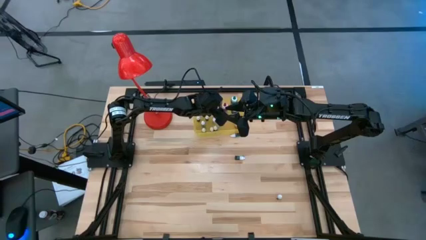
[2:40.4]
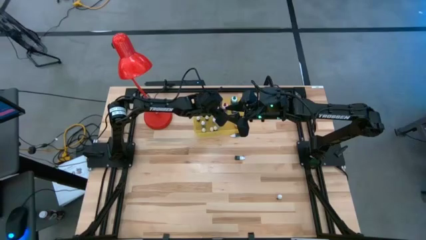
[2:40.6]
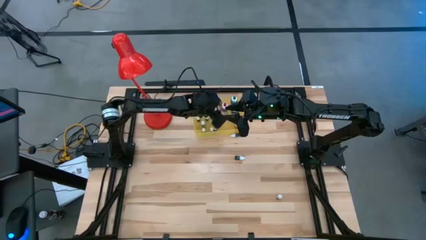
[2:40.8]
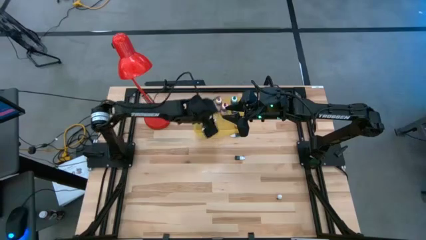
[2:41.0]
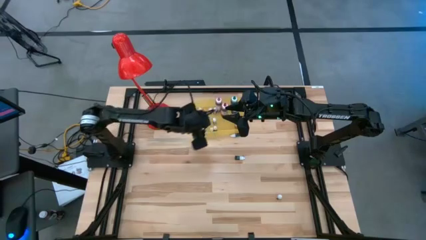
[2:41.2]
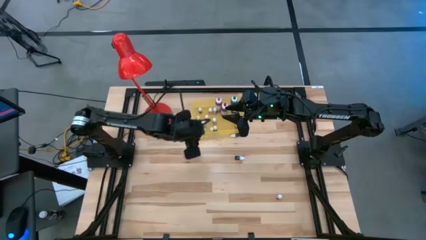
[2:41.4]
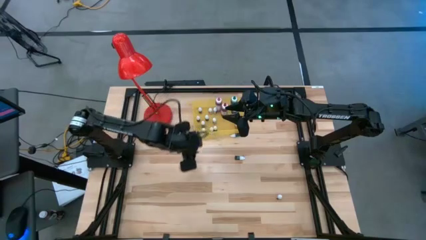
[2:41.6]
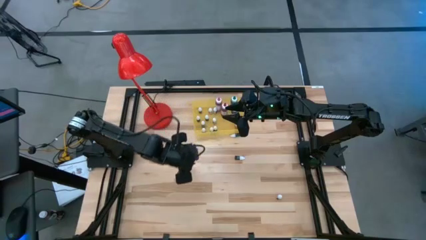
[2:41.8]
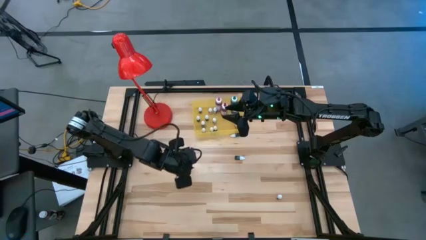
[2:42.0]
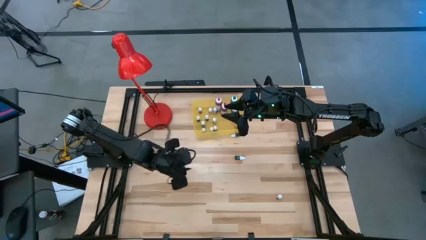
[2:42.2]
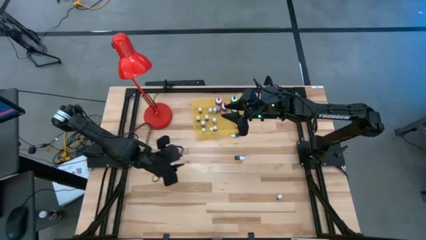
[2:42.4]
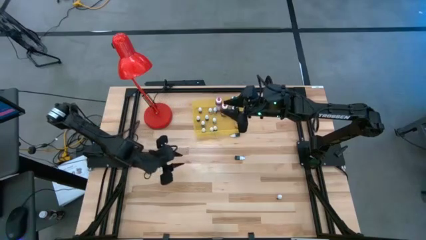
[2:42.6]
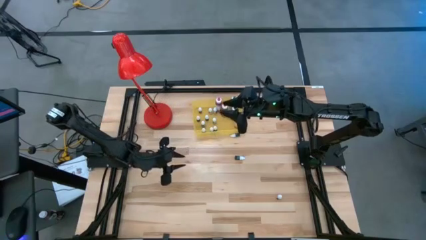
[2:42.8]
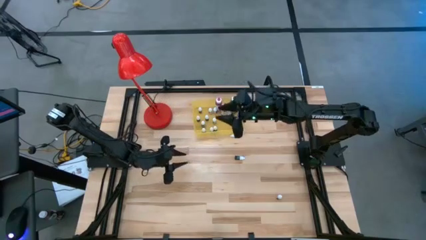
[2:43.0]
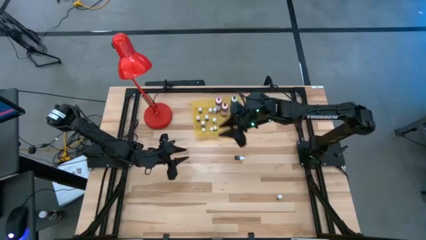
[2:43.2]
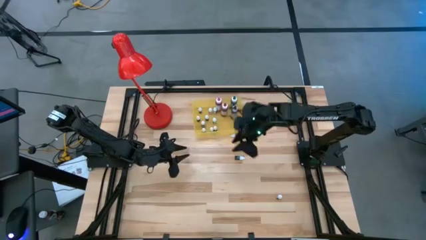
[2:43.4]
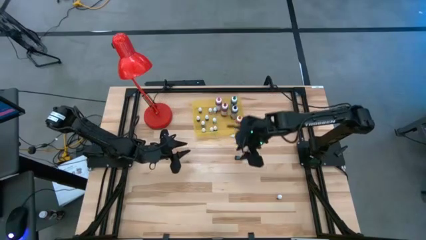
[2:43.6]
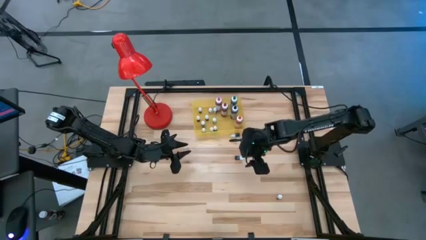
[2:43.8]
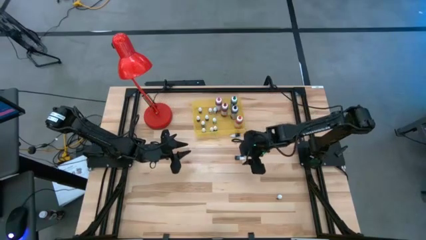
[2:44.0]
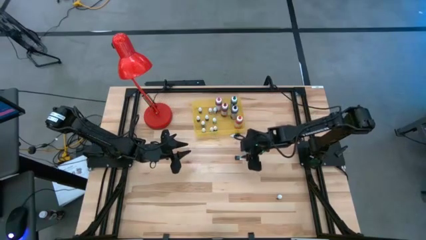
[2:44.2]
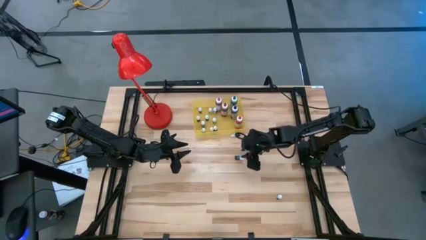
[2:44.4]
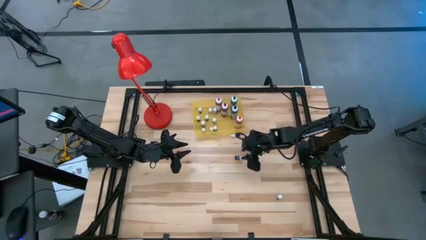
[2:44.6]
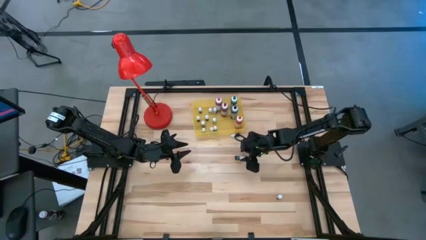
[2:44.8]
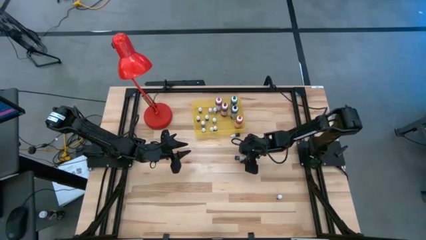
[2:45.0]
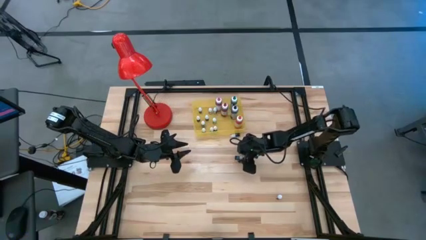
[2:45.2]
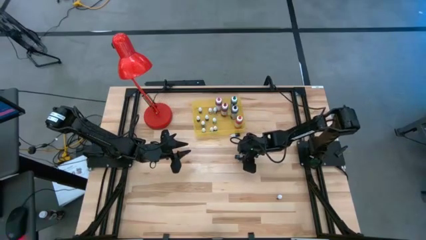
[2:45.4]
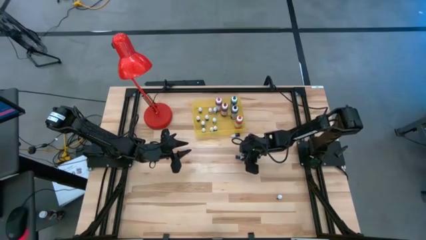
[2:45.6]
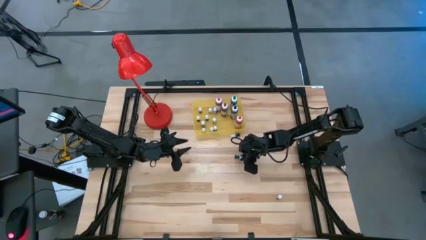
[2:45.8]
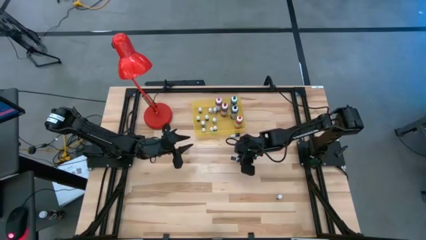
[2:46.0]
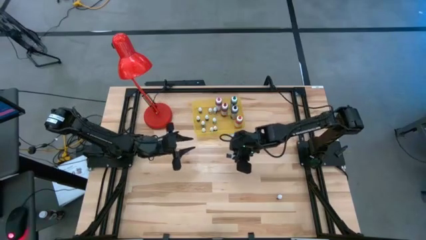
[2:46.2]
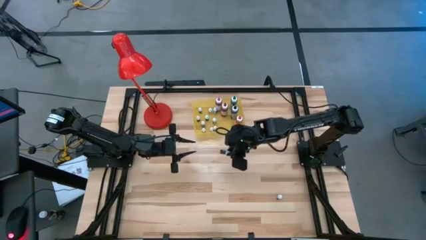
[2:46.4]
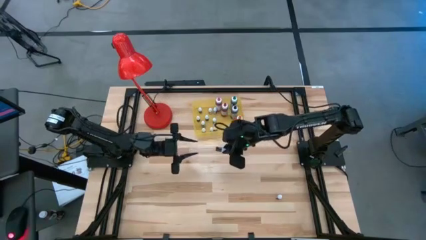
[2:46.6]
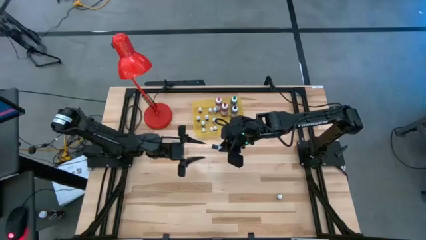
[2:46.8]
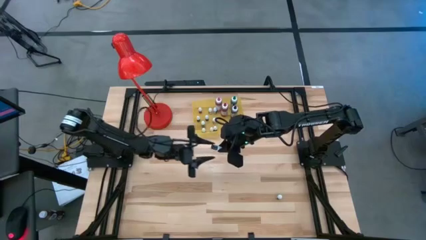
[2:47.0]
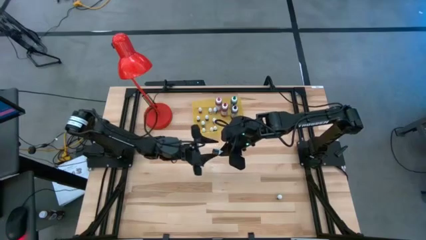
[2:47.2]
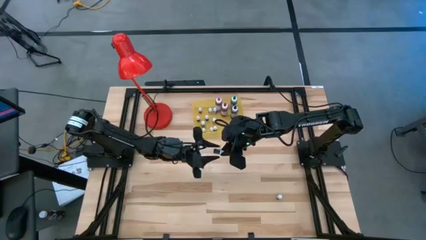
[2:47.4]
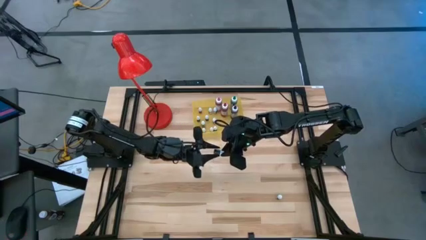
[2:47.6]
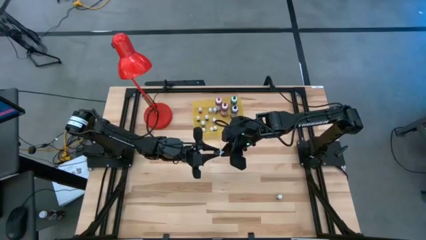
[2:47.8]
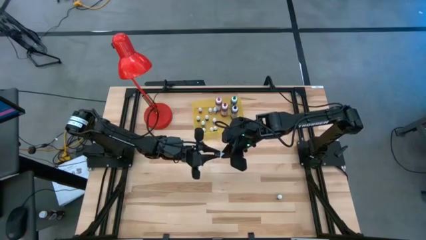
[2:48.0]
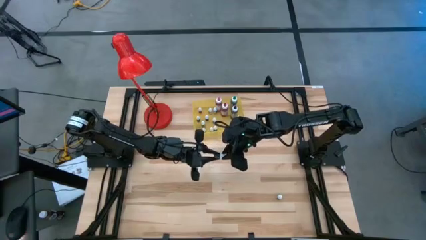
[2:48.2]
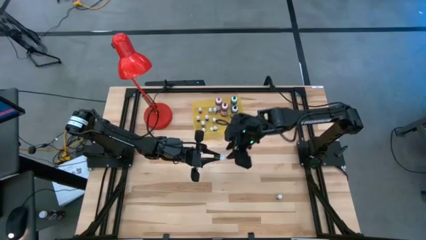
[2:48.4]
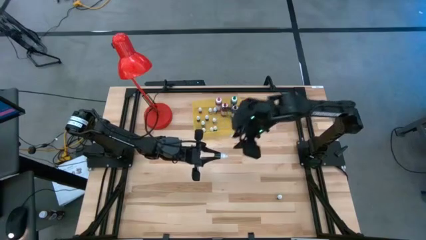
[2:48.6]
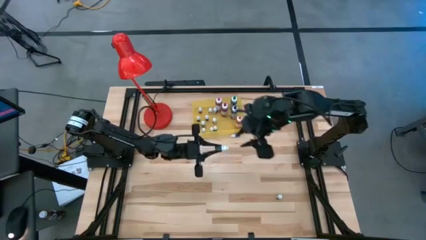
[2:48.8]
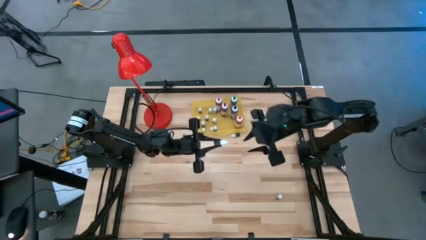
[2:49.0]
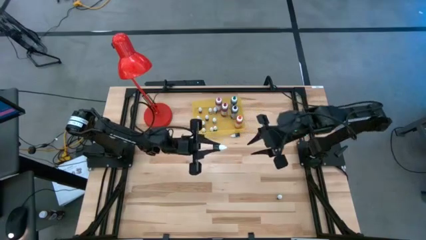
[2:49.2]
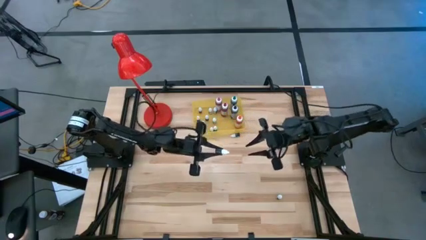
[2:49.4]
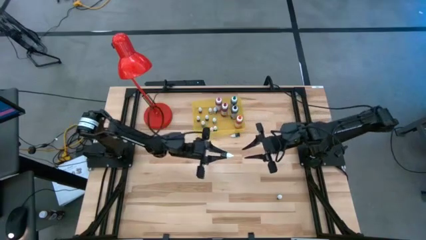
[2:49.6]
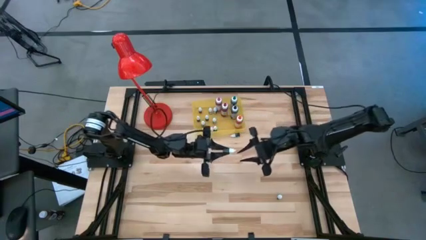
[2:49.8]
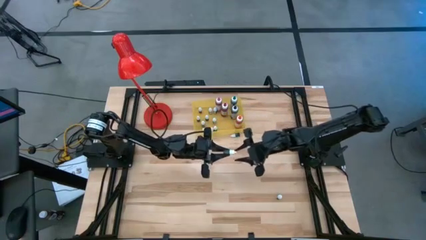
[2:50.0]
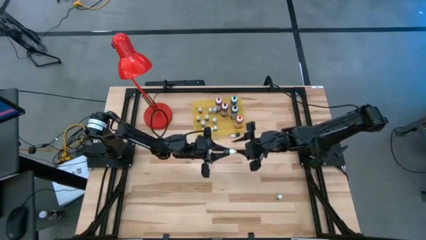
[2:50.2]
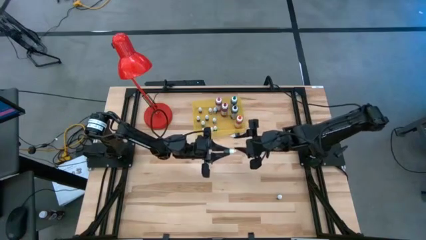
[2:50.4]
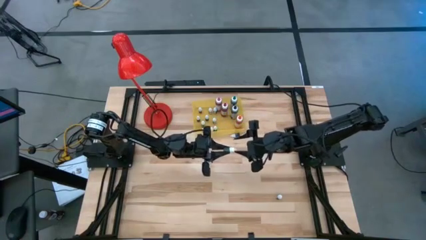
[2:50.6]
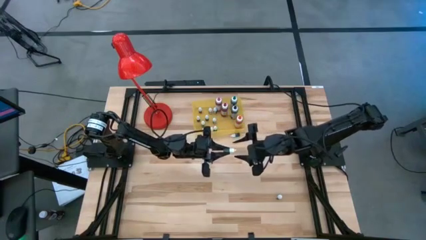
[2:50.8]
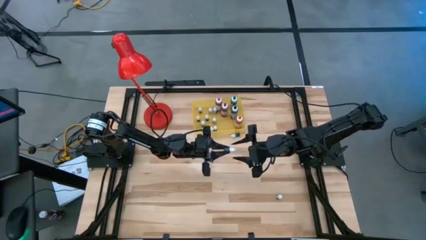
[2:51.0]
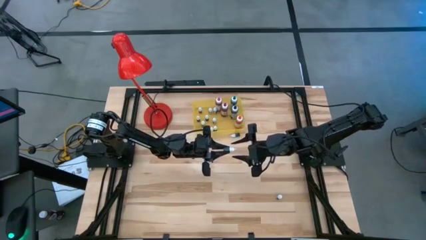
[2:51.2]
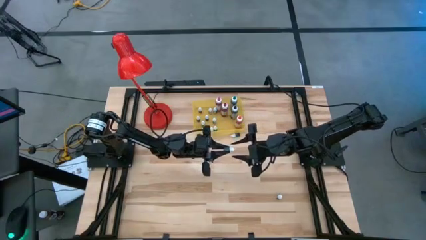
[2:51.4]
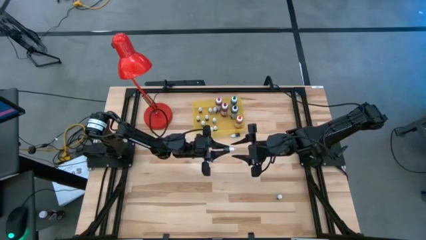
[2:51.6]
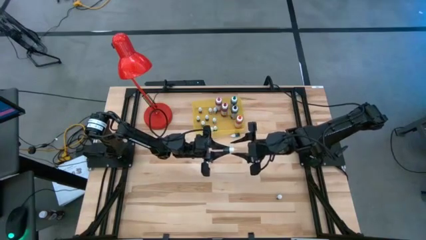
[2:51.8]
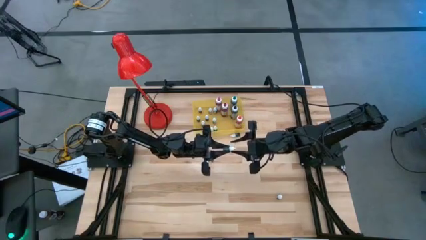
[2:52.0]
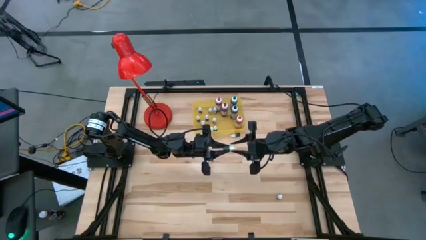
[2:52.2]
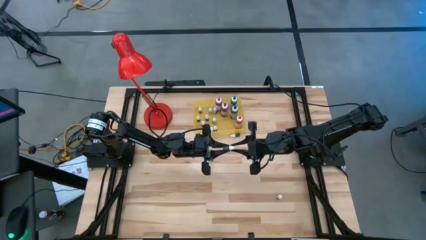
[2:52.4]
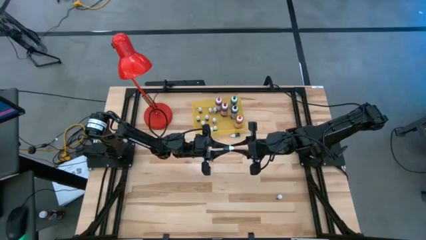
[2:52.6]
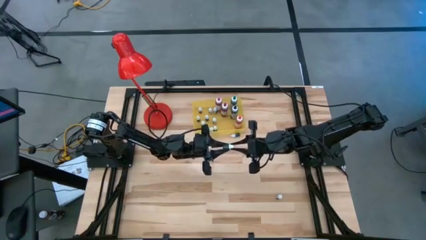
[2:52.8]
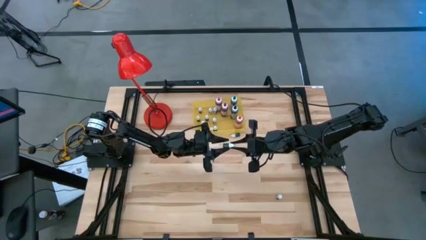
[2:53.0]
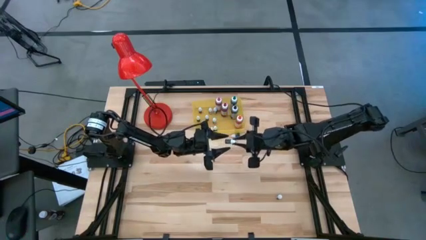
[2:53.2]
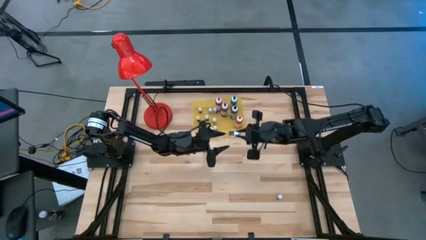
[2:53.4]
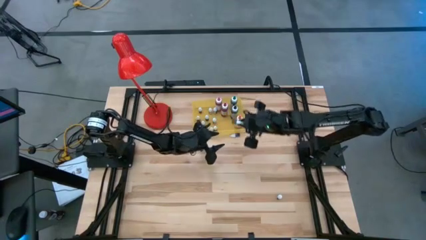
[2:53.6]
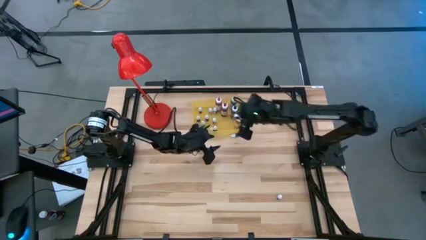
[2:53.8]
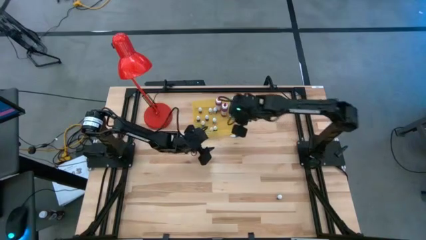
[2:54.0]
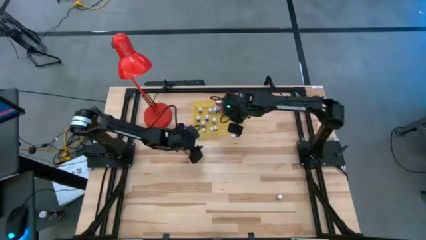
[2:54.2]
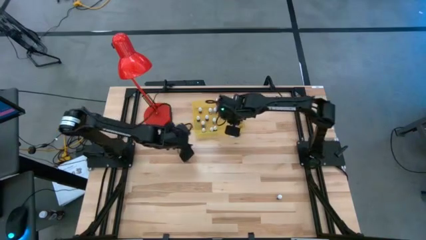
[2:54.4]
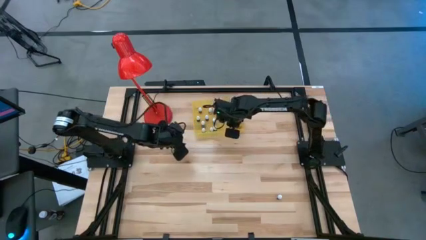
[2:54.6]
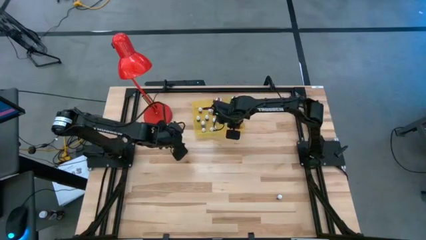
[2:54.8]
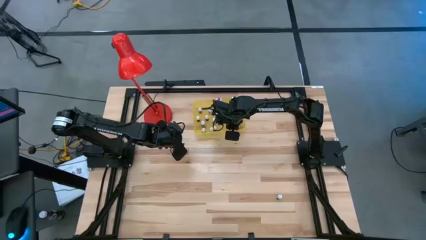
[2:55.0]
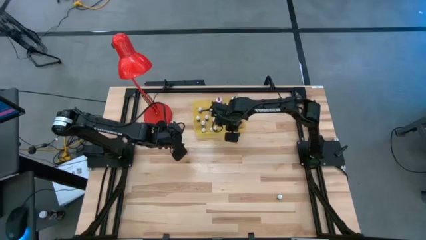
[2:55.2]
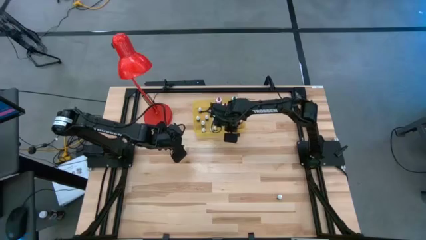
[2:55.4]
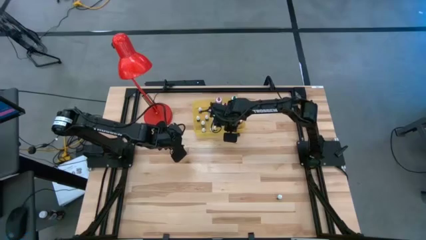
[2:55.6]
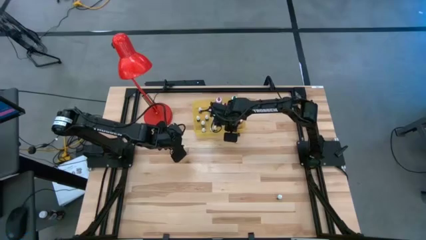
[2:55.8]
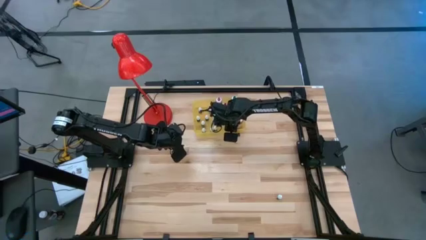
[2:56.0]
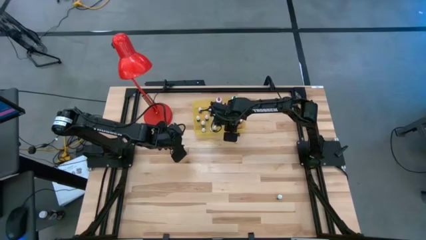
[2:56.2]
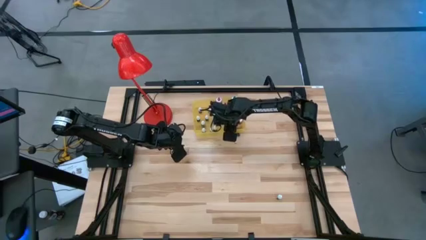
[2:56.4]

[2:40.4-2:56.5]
Task: Pick & Place food coloring
Put the small green food coloring bottle into the yellow bin
